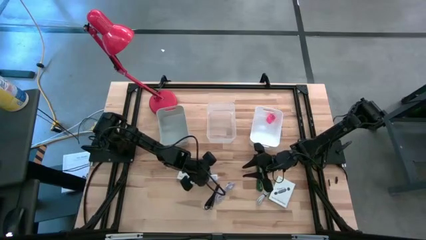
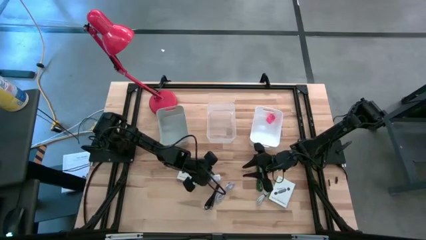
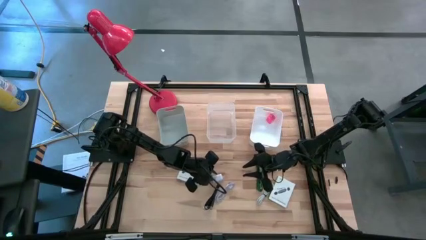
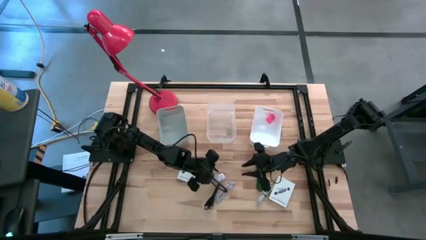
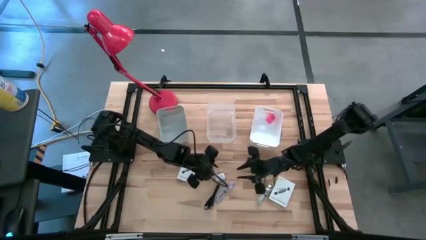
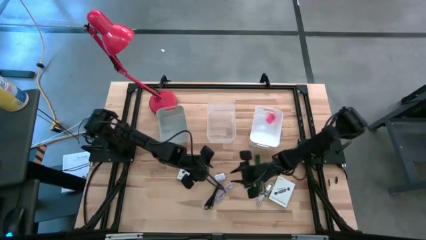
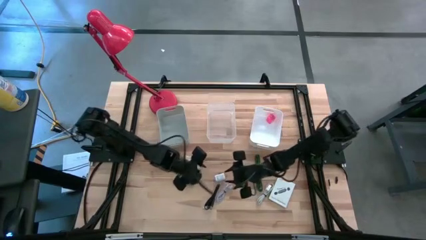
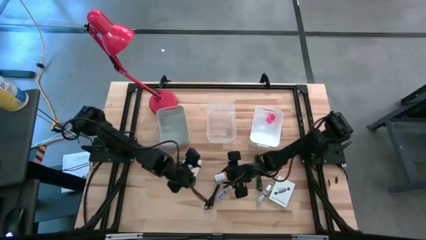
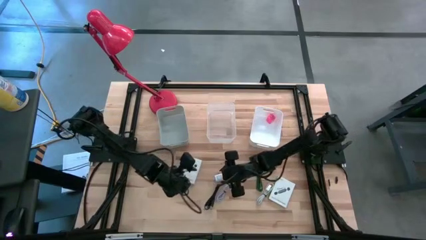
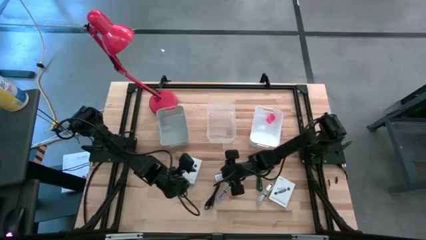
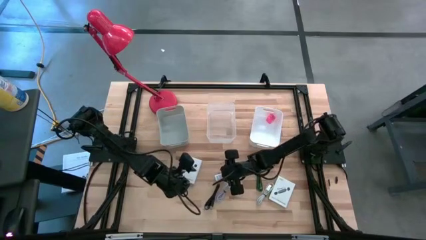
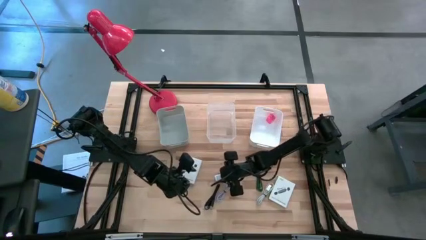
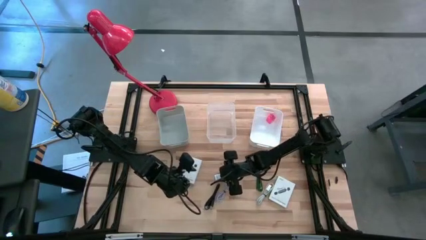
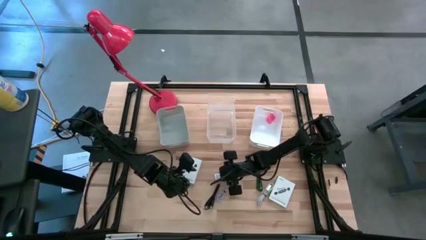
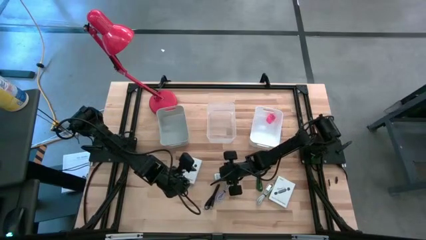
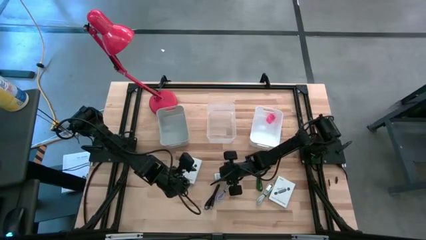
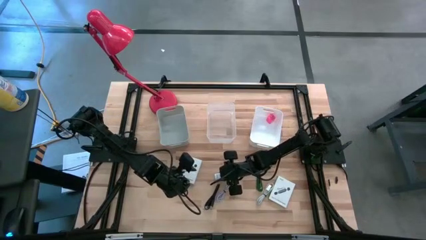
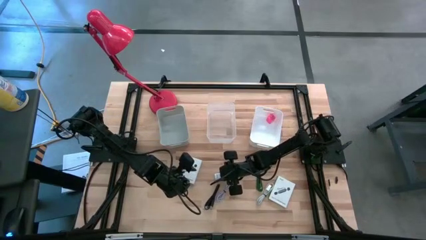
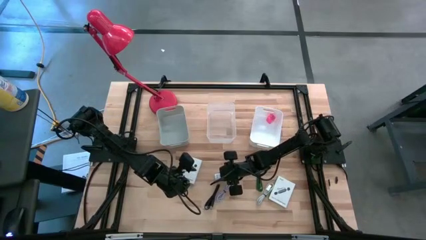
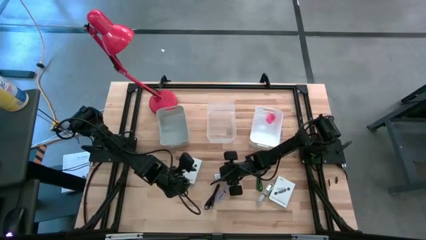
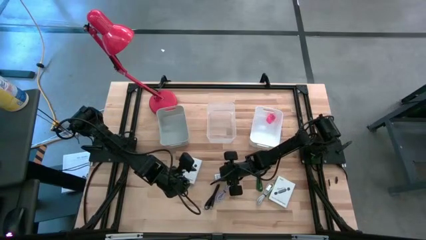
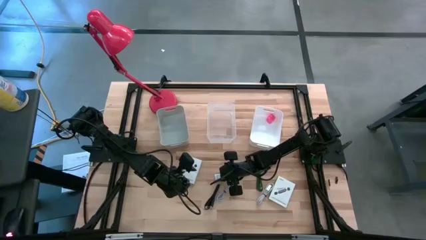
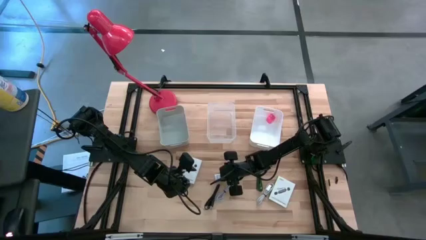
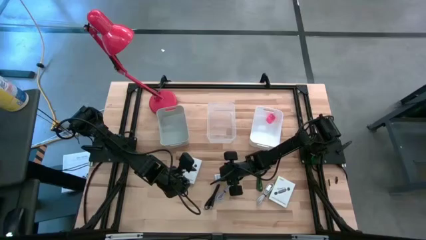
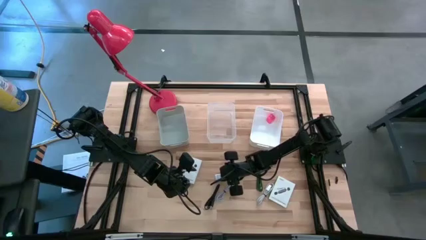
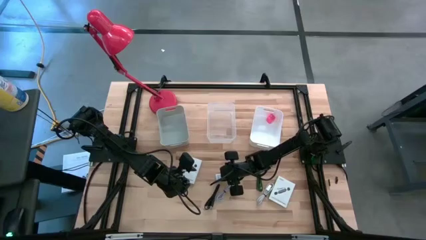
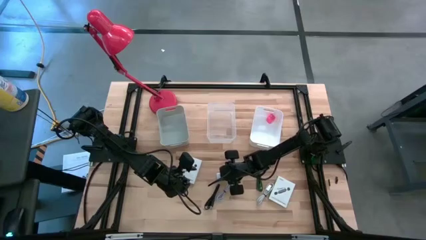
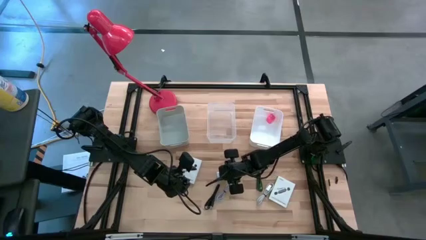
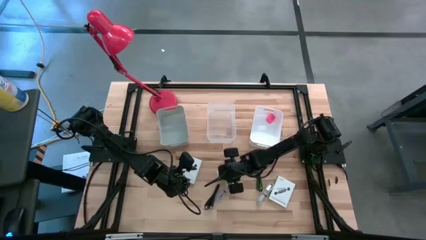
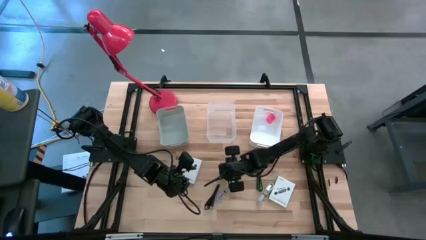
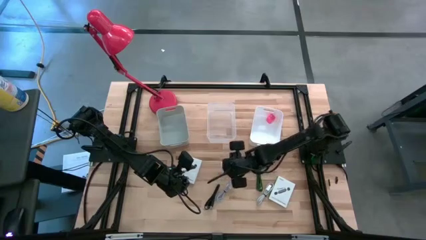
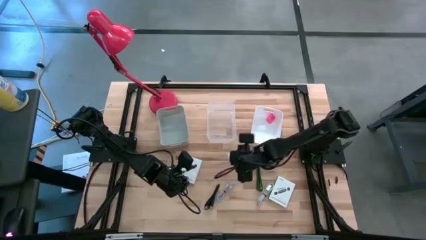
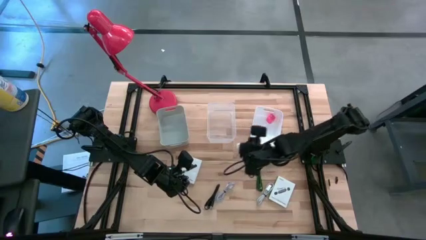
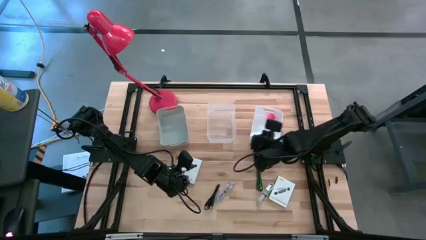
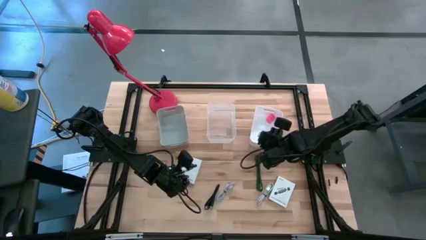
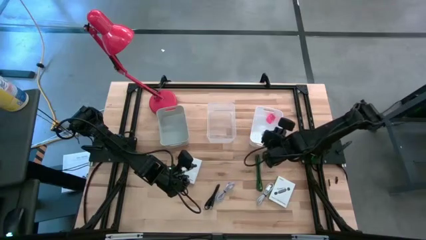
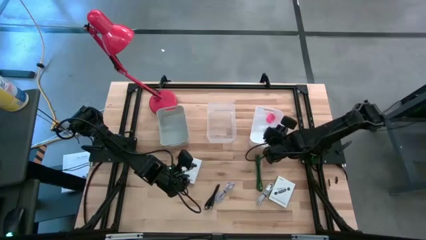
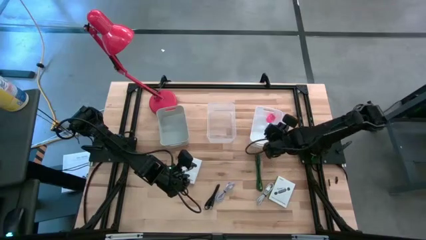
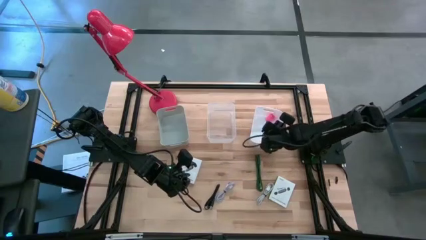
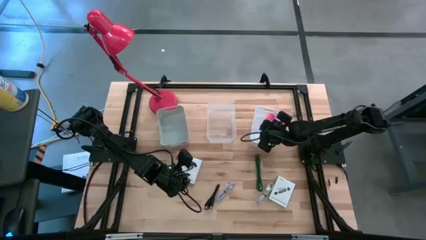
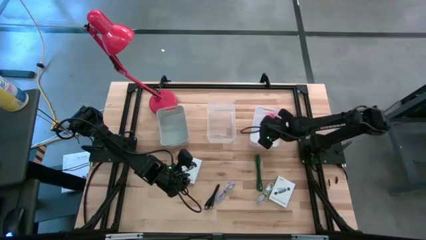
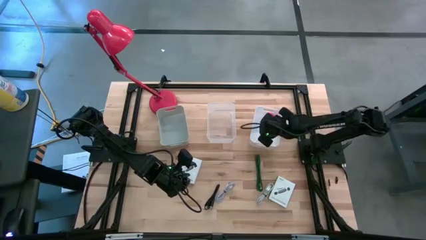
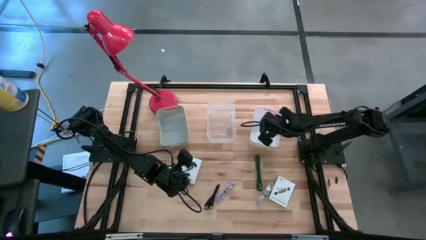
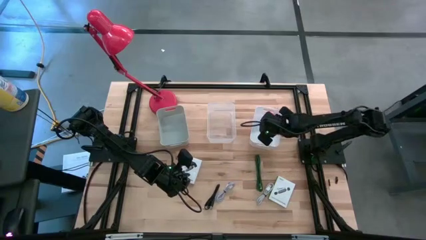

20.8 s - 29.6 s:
Task: Pick and place items into bin
Put the white charger adapter into the white bin

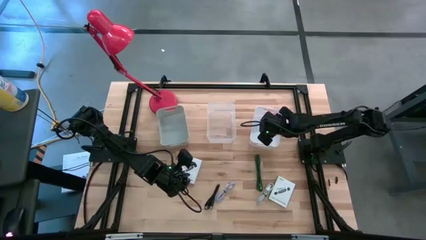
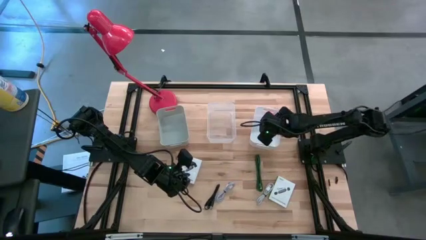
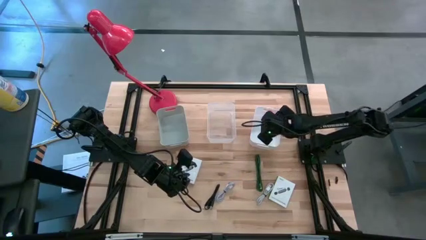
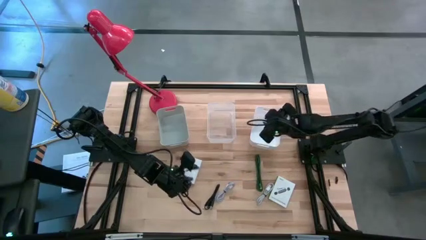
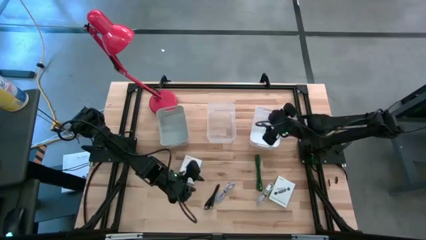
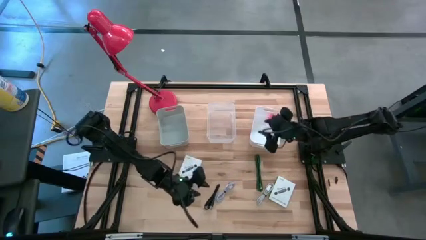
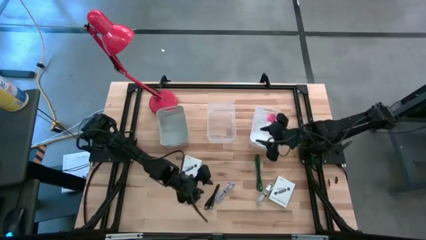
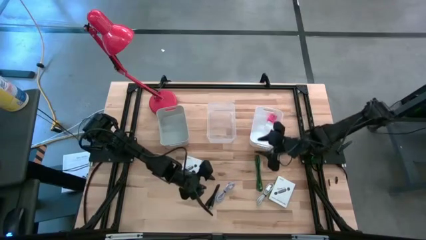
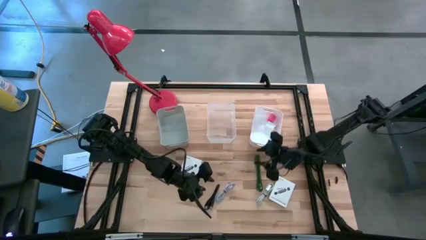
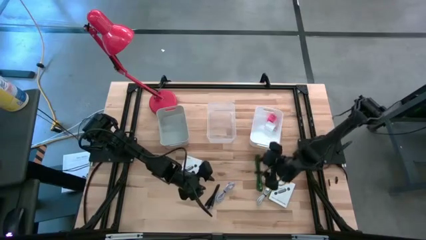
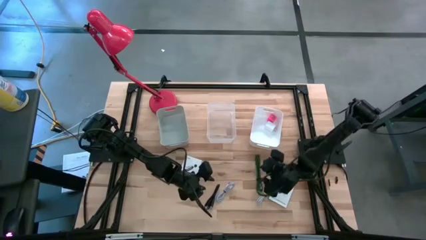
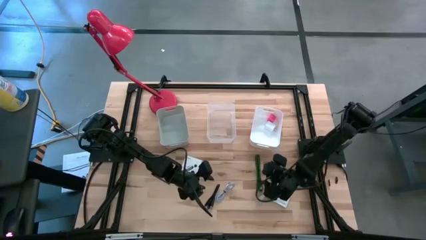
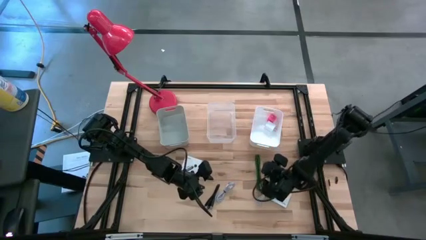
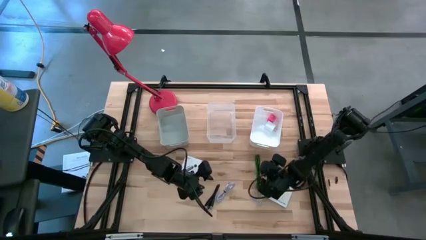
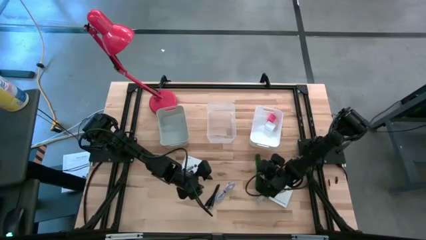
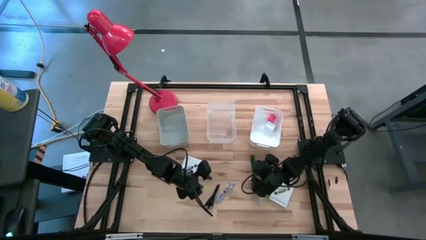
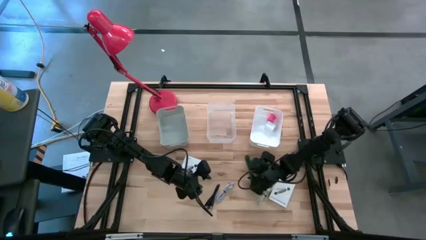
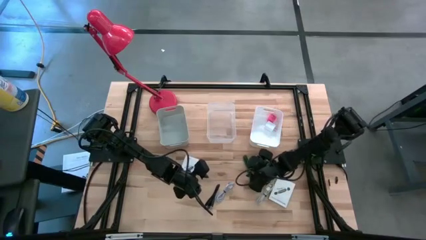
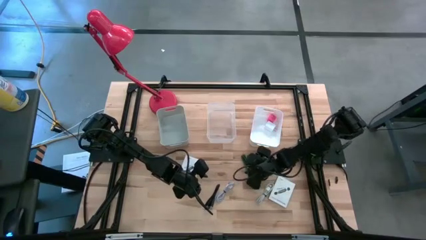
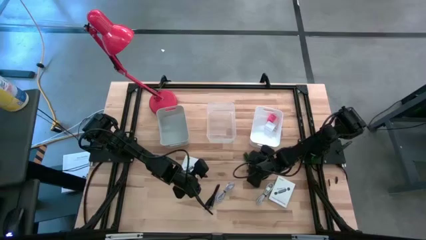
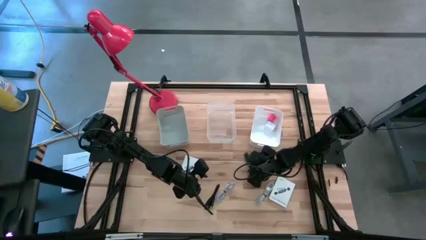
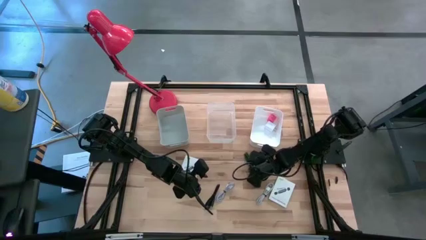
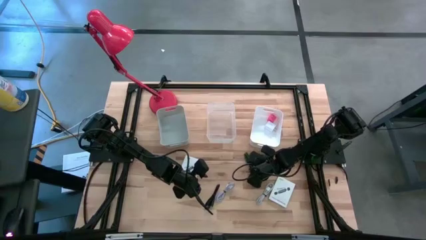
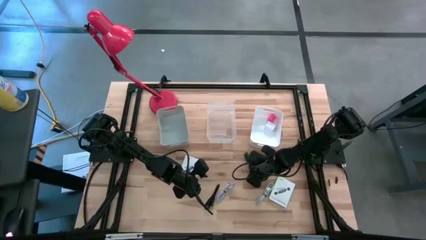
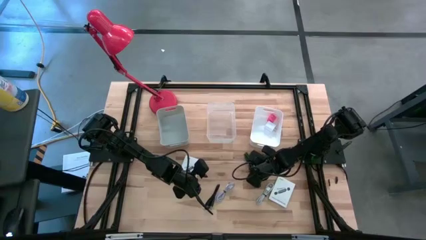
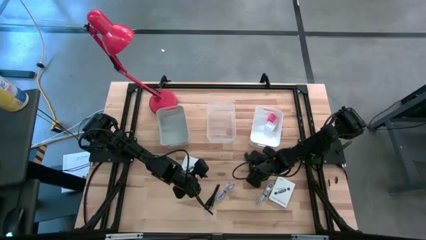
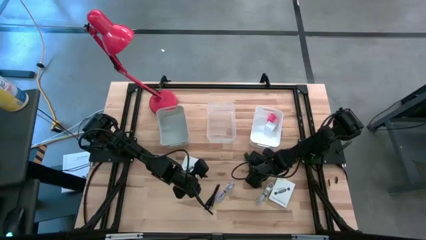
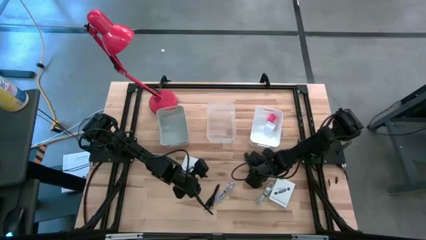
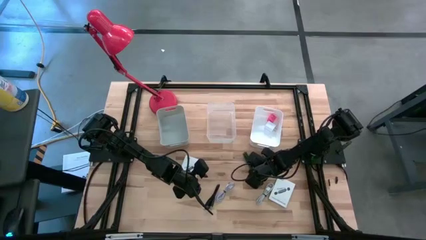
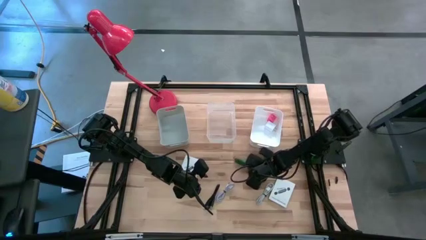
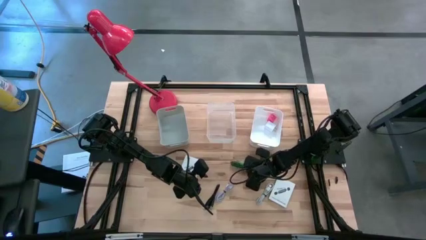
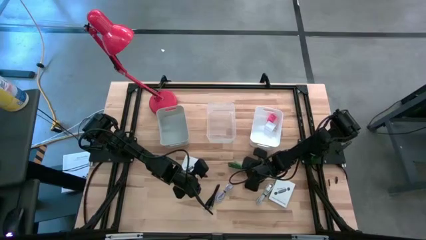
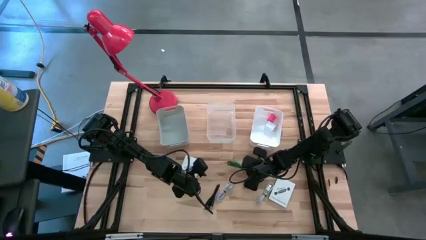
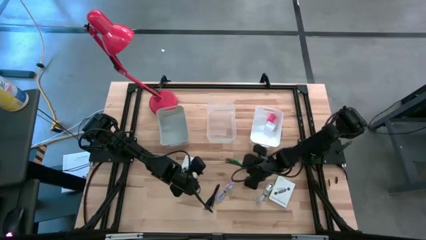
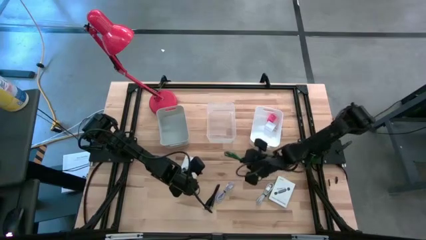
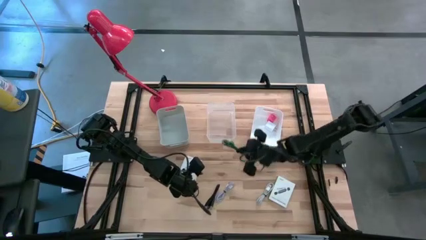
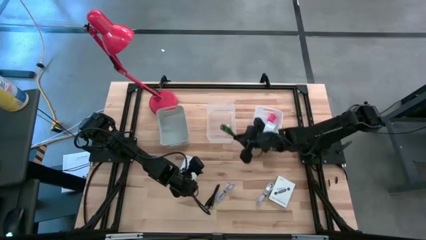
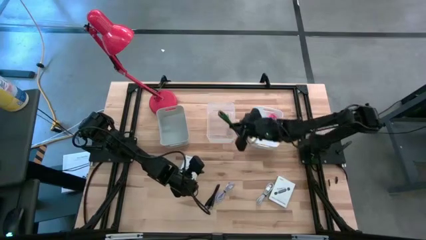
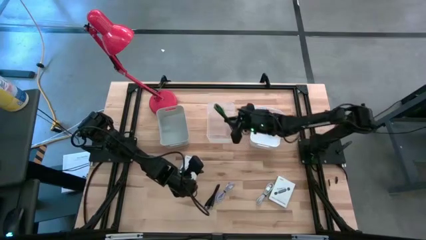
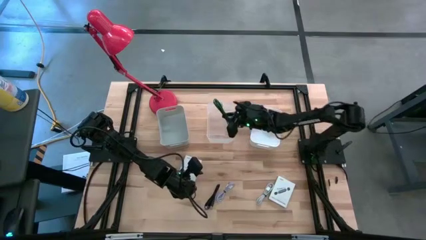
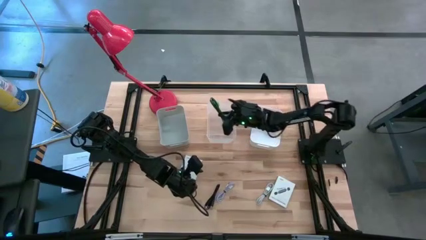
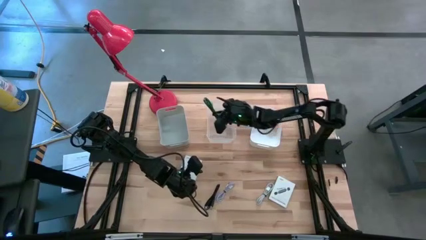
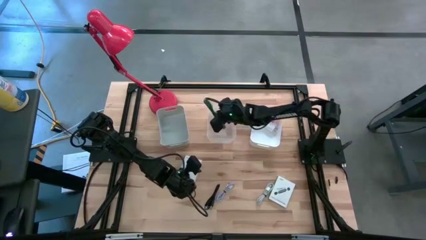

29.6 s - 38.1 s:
Put the green USB cable into the transparent bin
